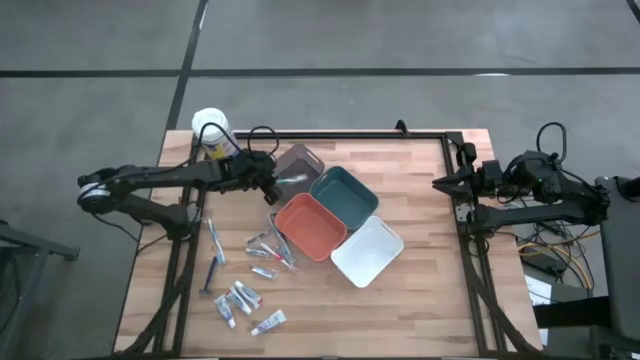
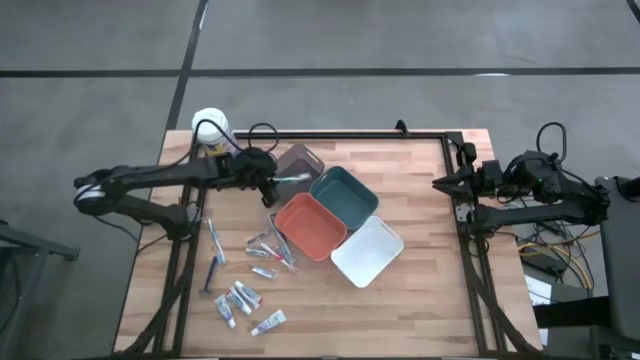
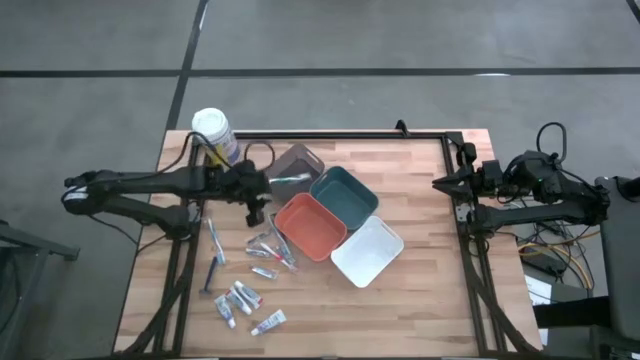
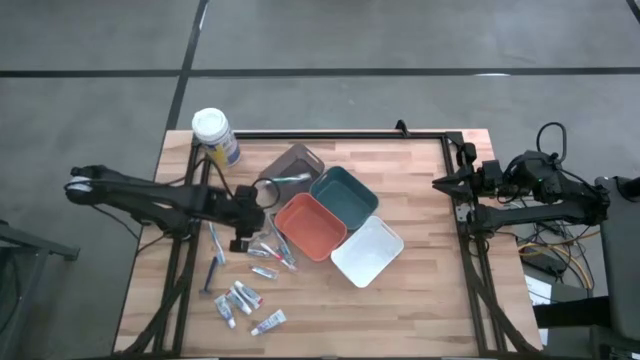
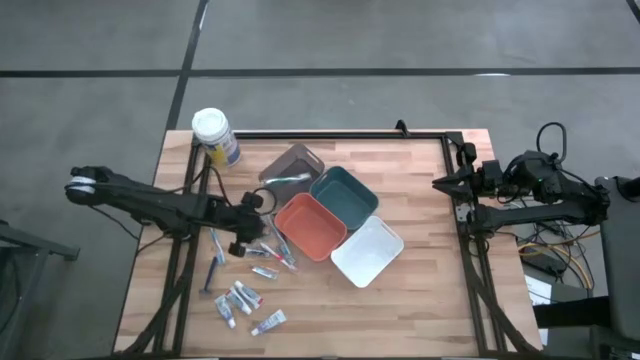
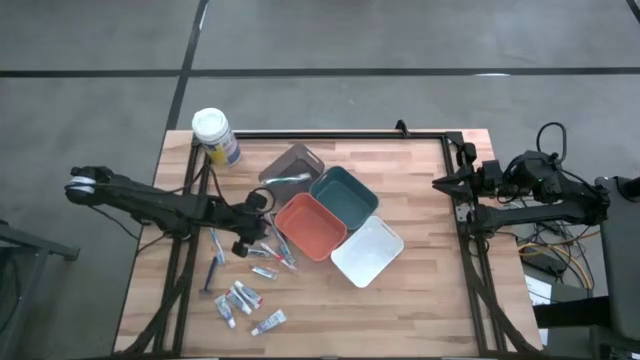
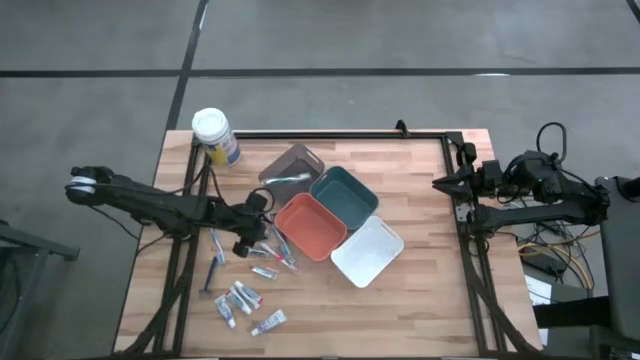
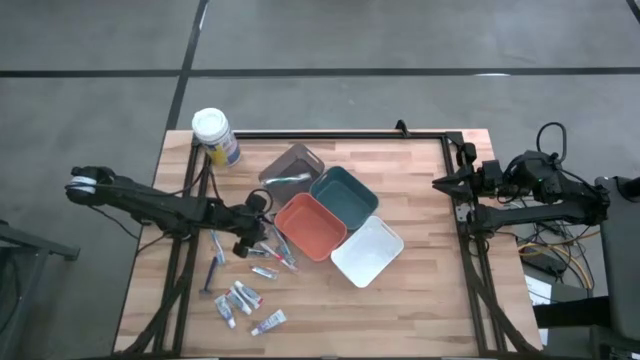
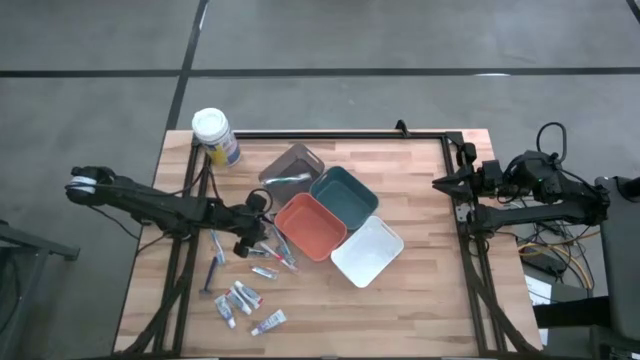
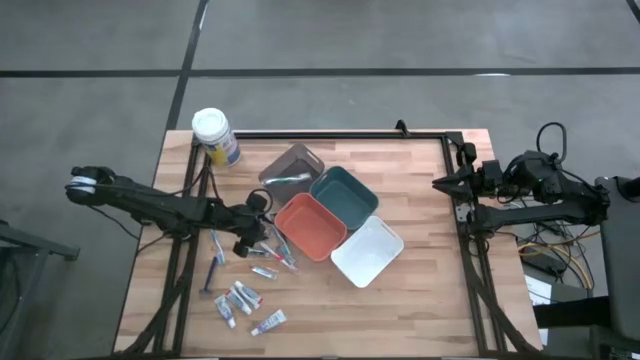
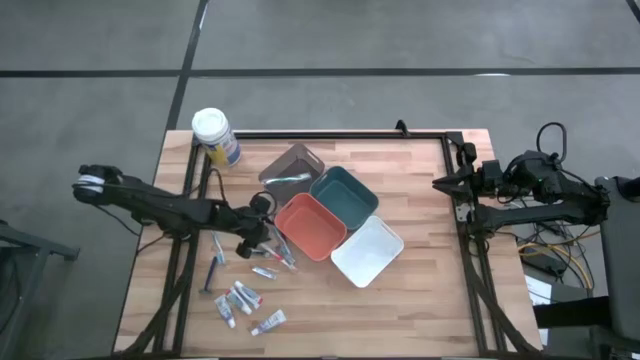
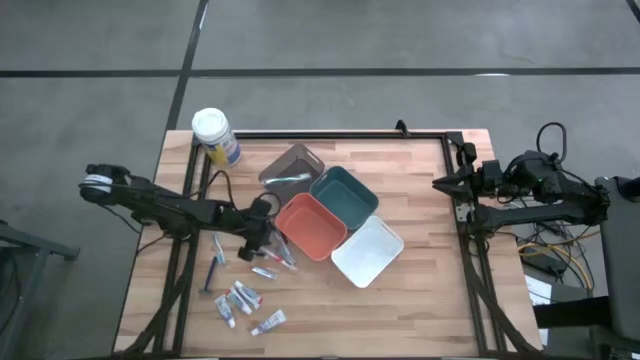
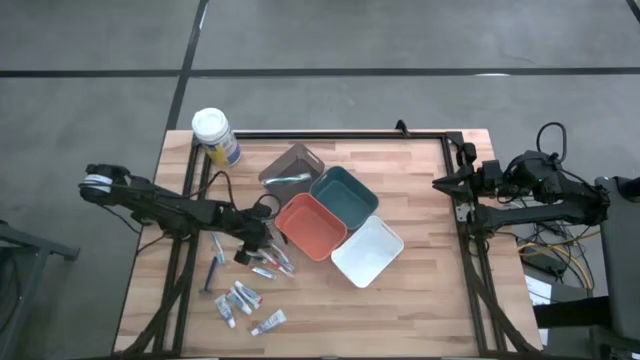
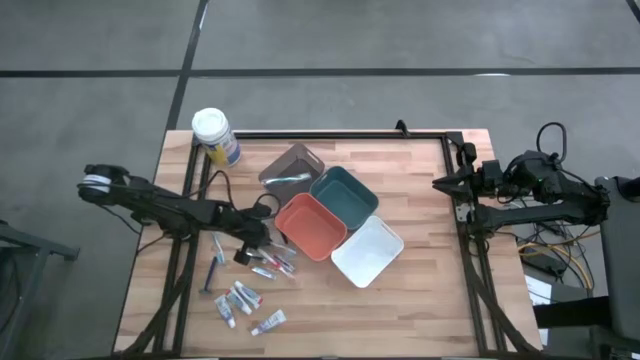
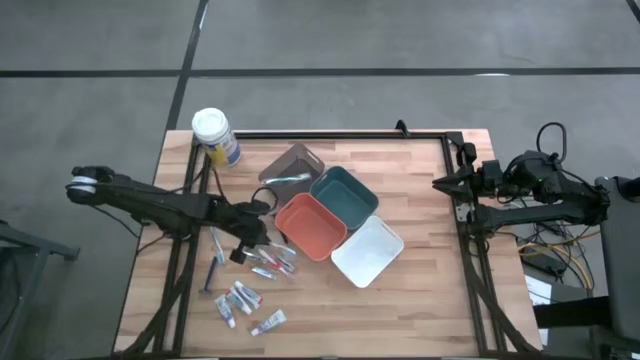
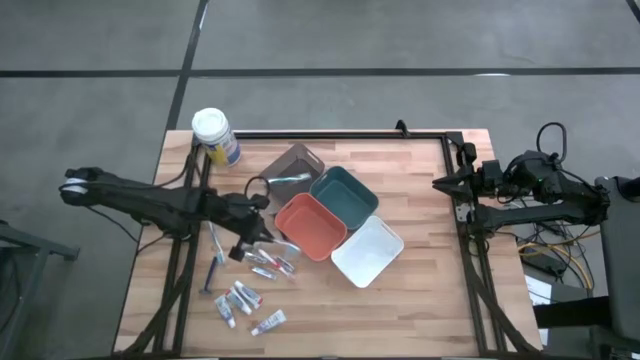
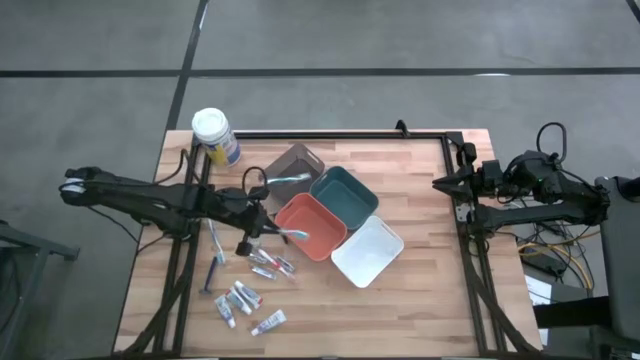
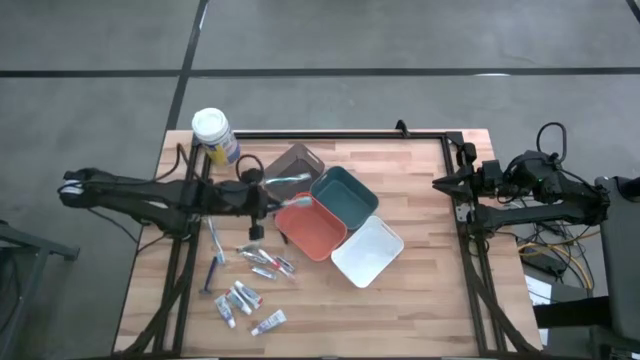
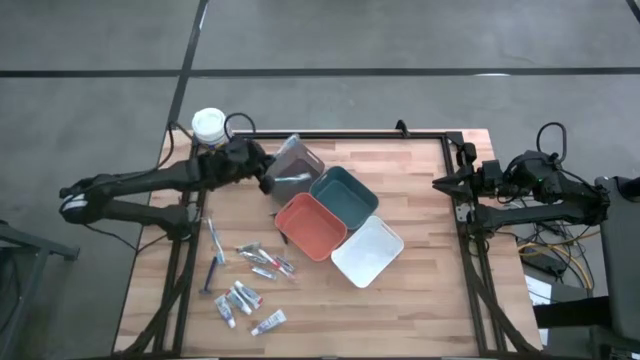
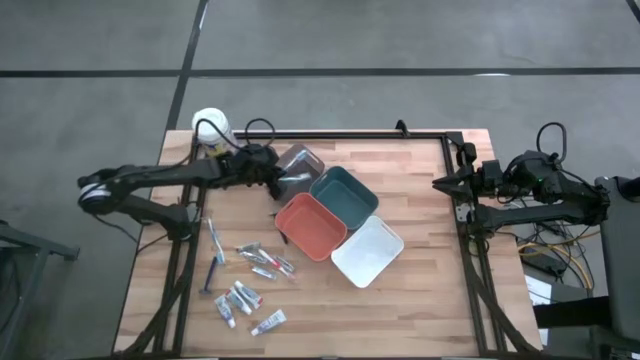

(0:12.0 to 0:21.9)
Task: Pick & Place Travel size toiletries
Put the blue toothbrush into the black bin

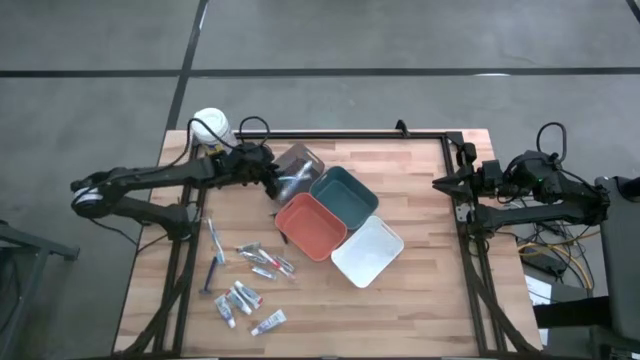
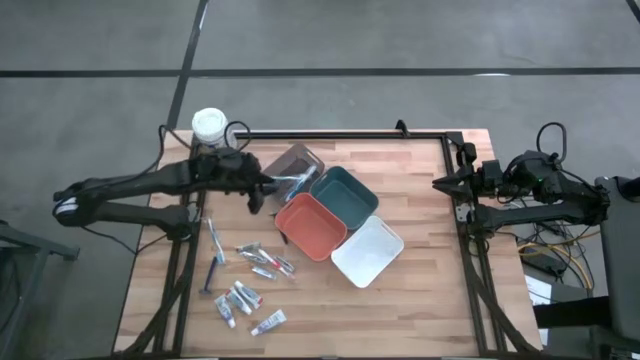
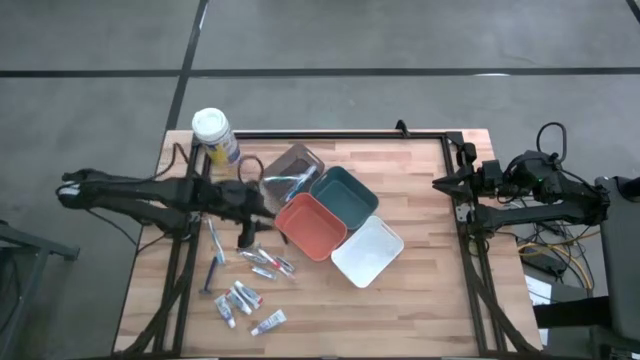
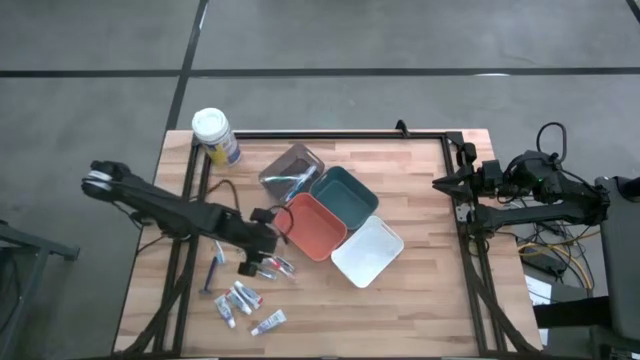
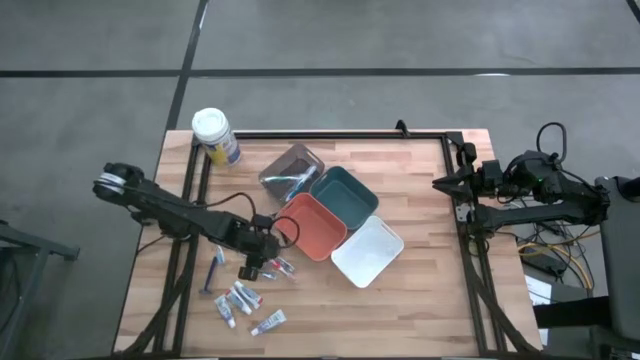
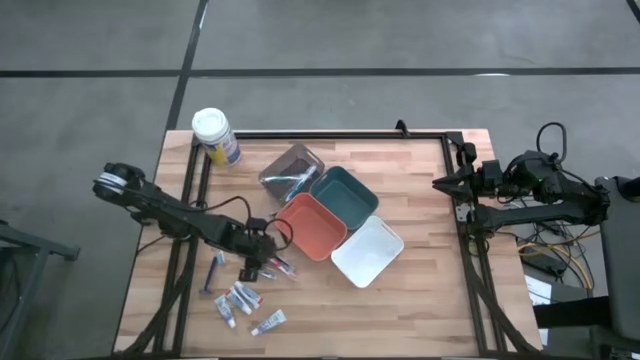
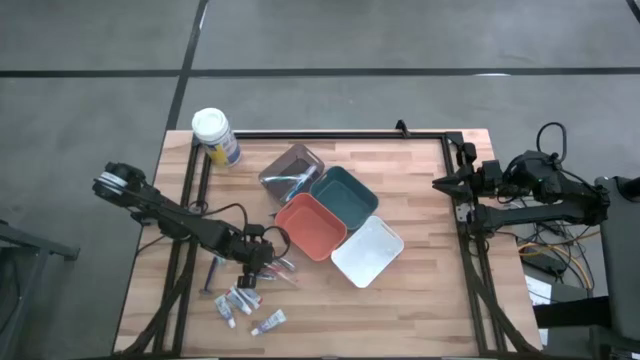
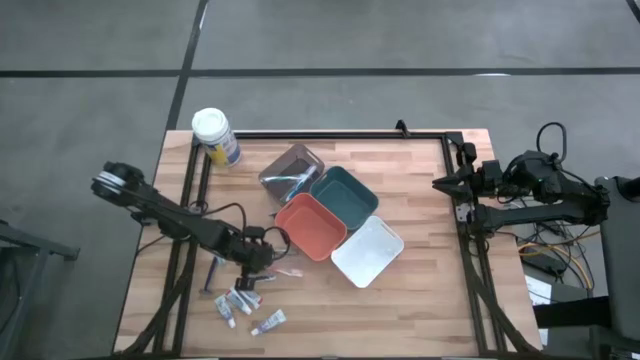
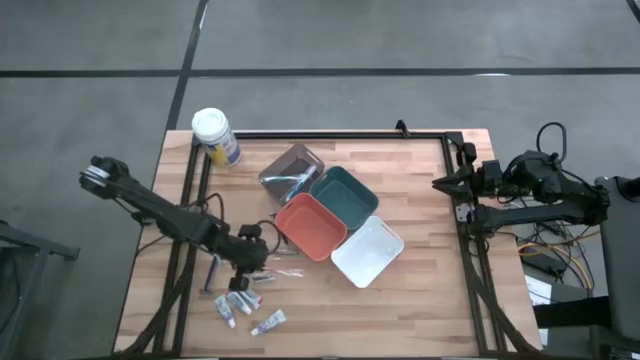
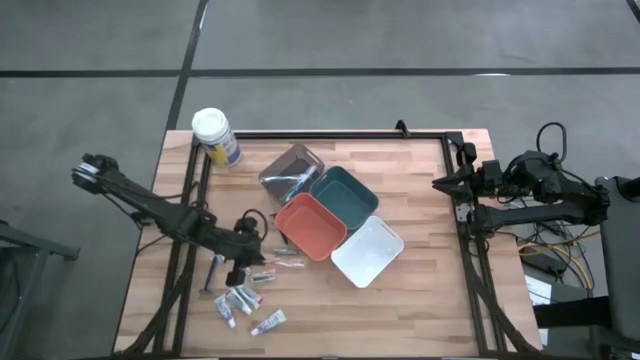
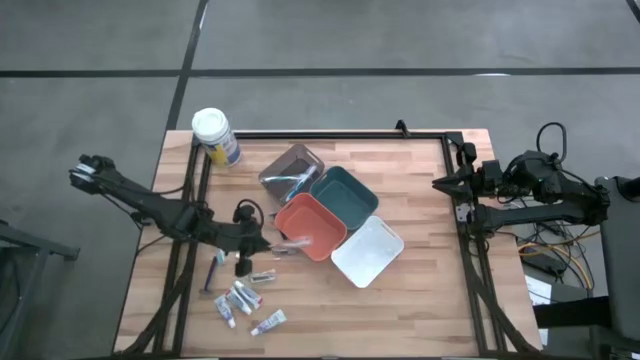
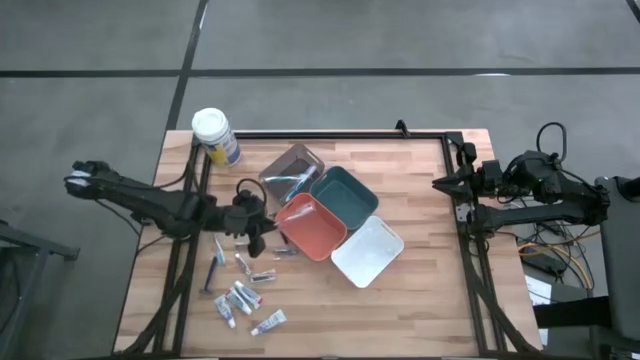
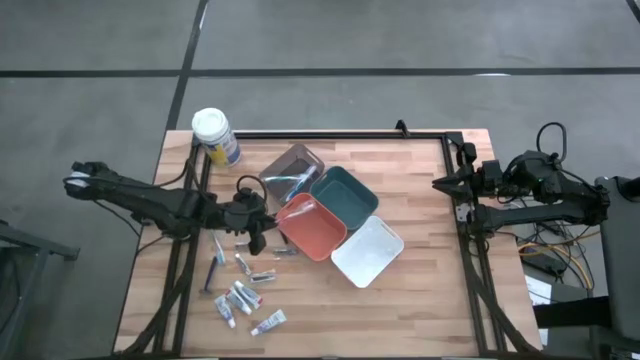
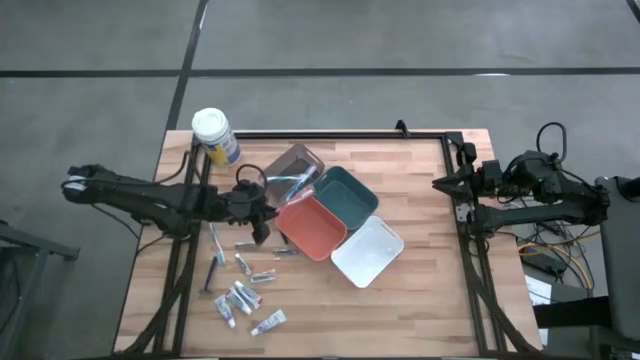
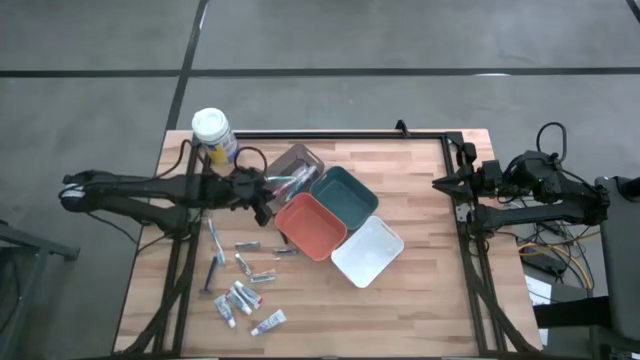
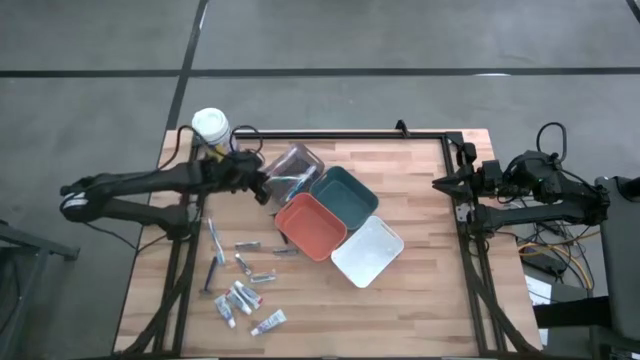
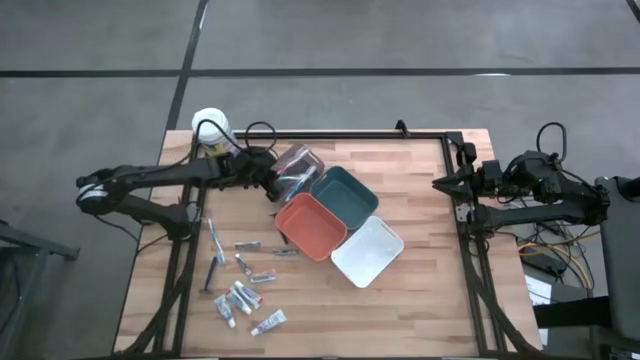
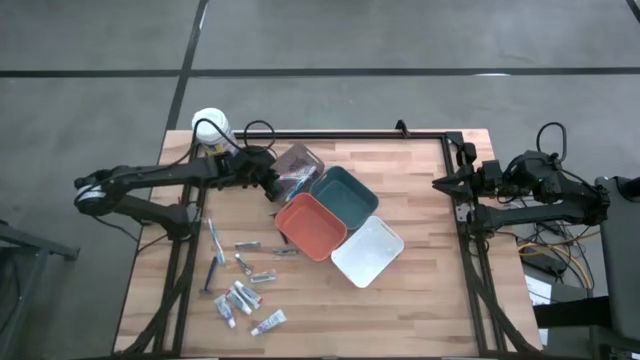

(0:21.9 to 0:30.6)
Put the orange toothbrush into the black bin

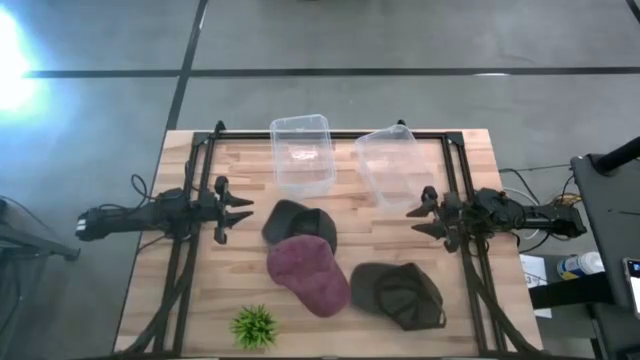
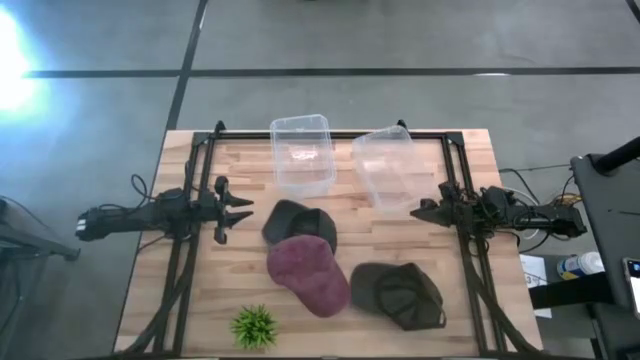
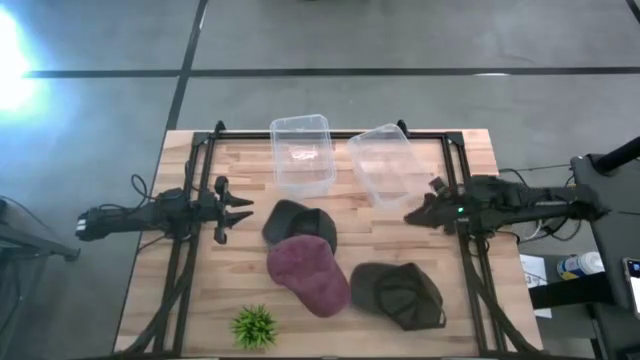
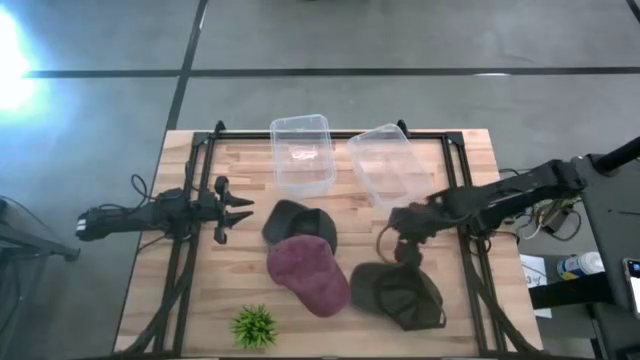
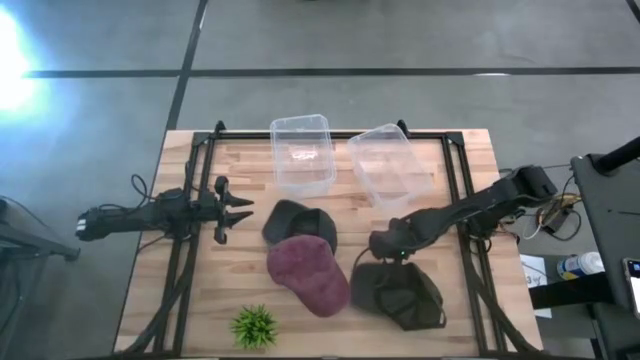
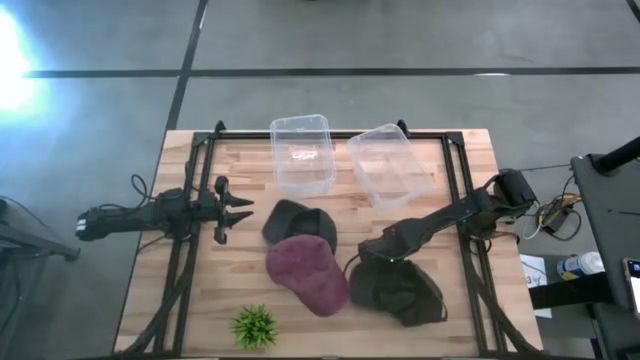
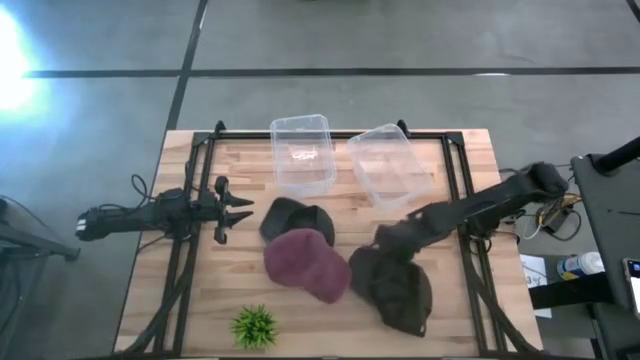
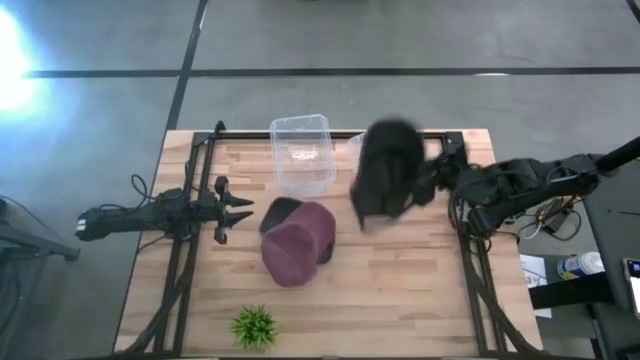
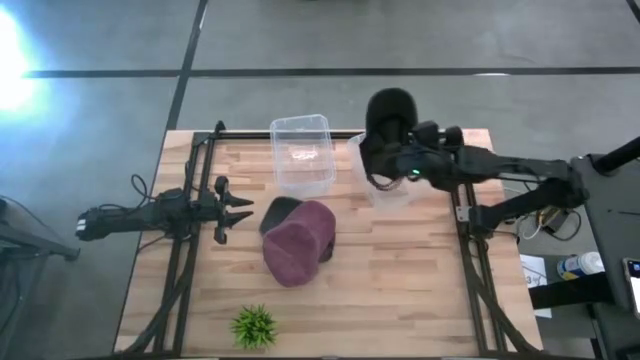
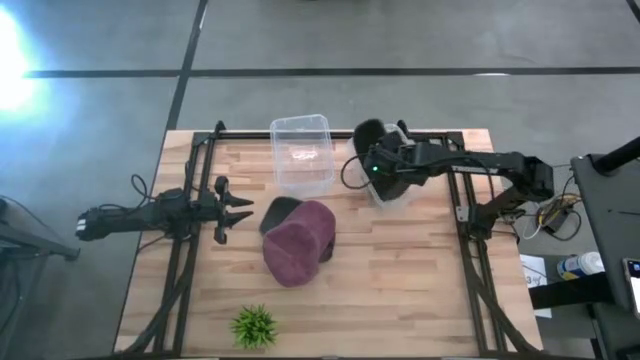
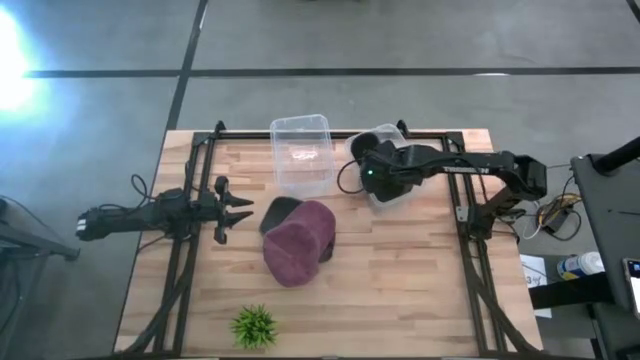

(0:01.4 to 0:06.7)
Task: Pick & Place hat
Put the right black cap into the right transparent bin
